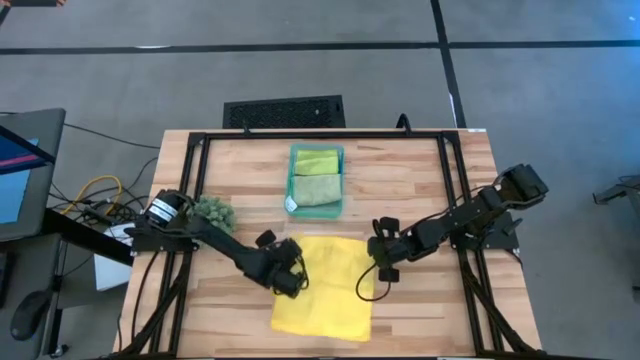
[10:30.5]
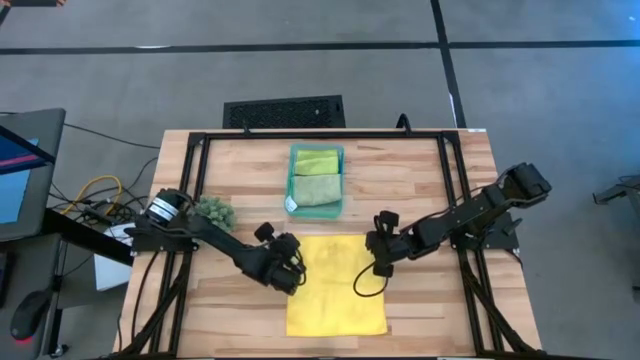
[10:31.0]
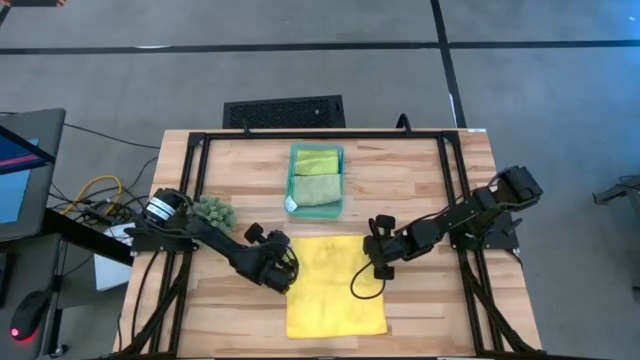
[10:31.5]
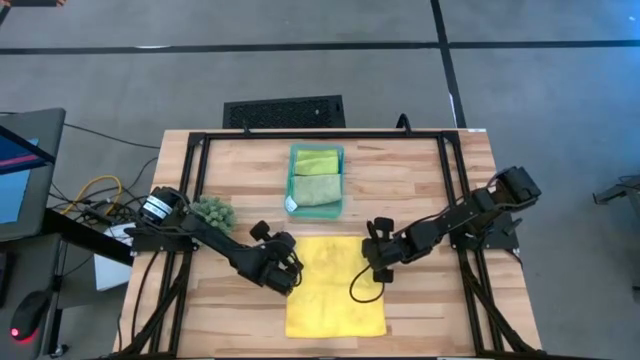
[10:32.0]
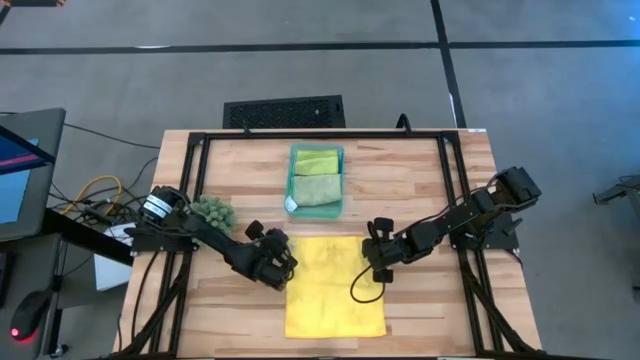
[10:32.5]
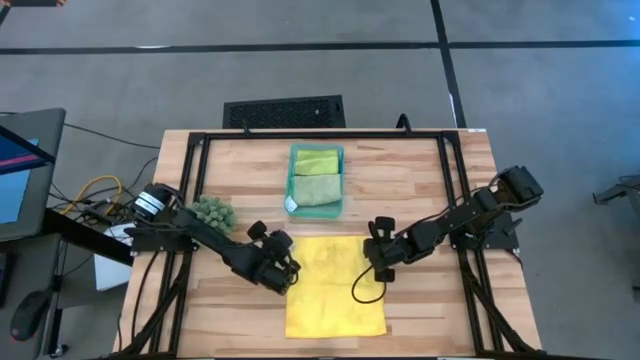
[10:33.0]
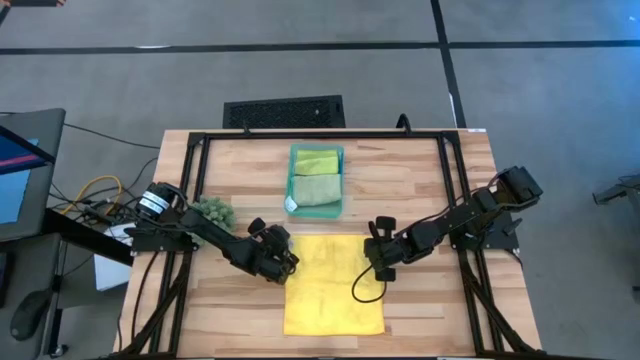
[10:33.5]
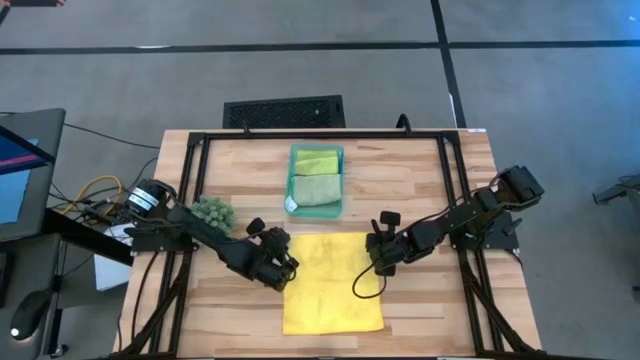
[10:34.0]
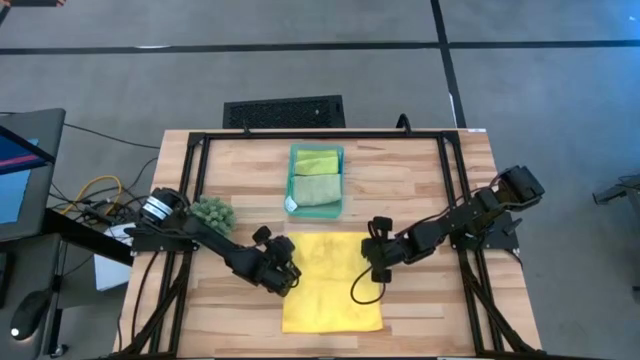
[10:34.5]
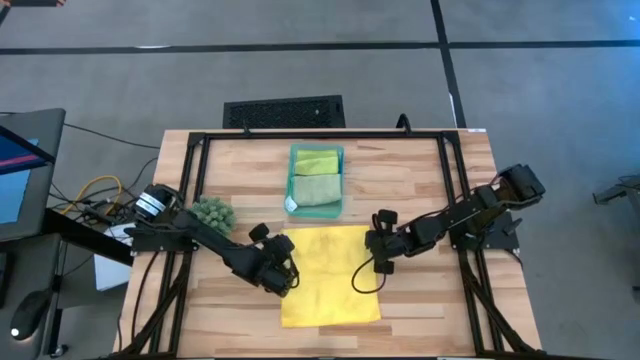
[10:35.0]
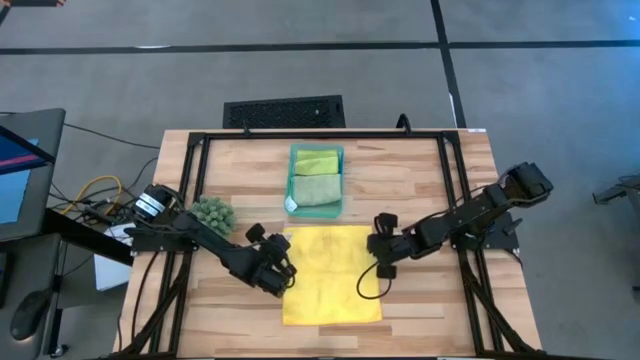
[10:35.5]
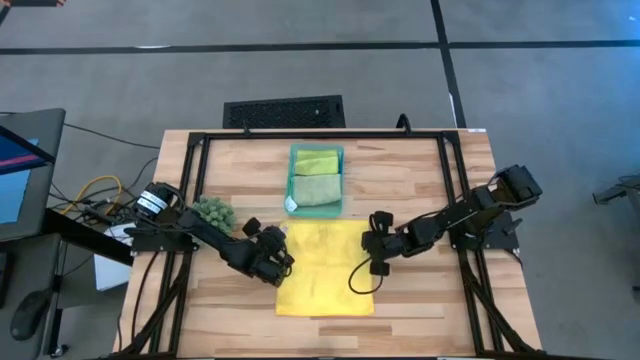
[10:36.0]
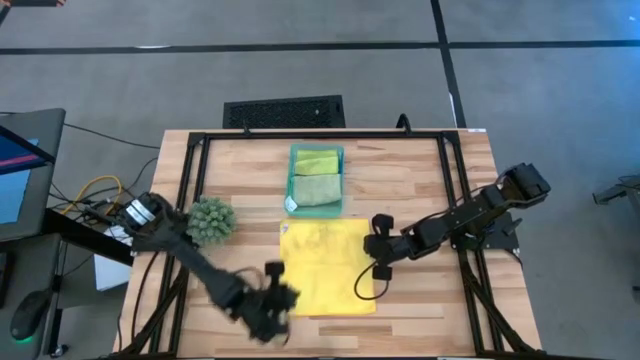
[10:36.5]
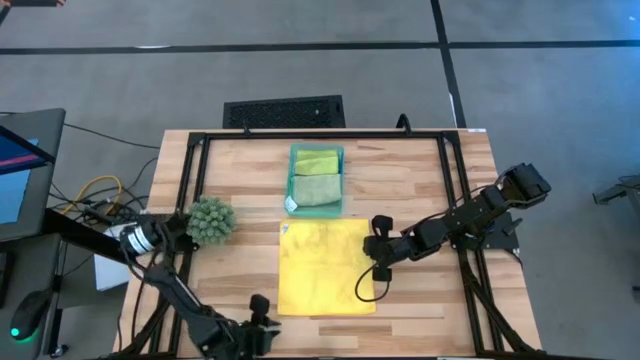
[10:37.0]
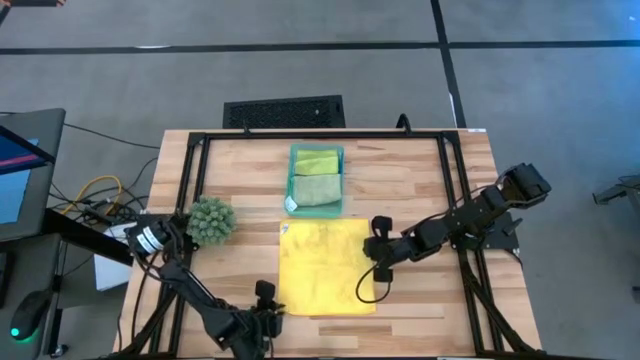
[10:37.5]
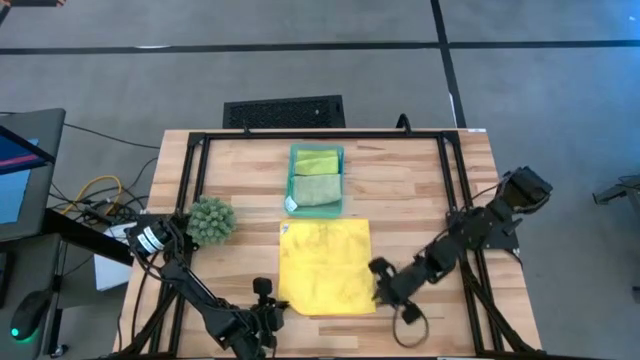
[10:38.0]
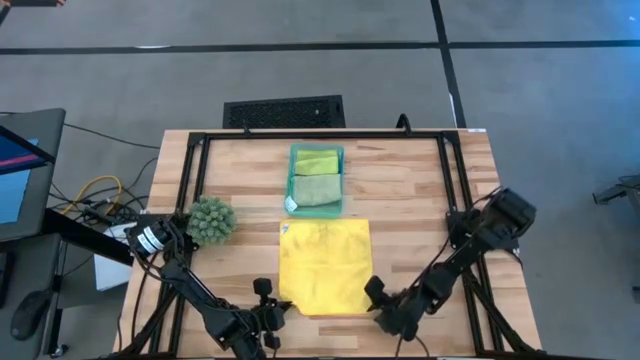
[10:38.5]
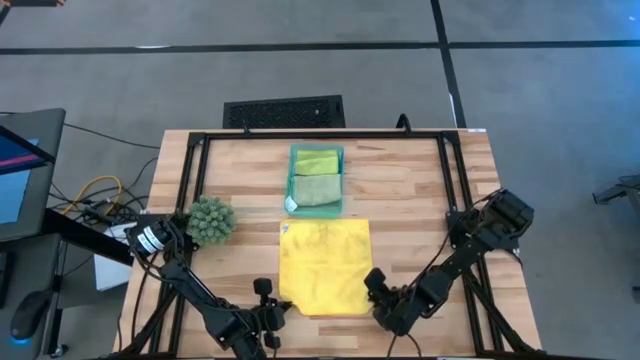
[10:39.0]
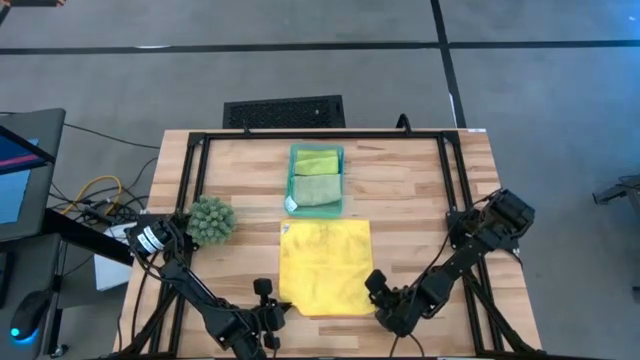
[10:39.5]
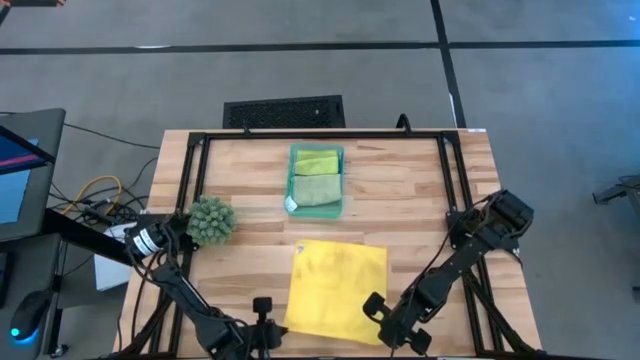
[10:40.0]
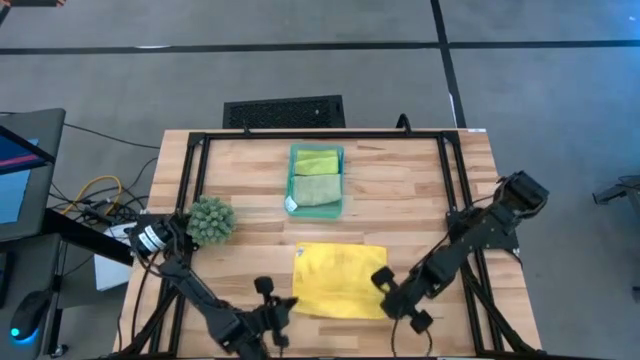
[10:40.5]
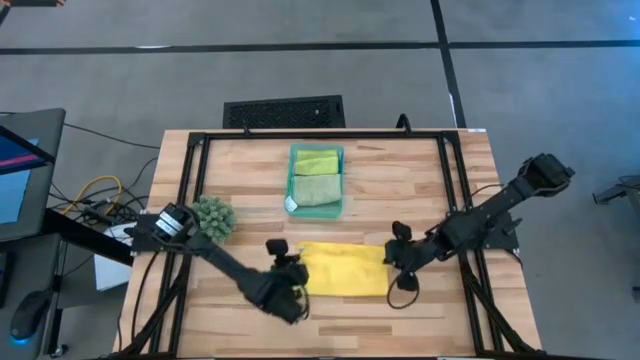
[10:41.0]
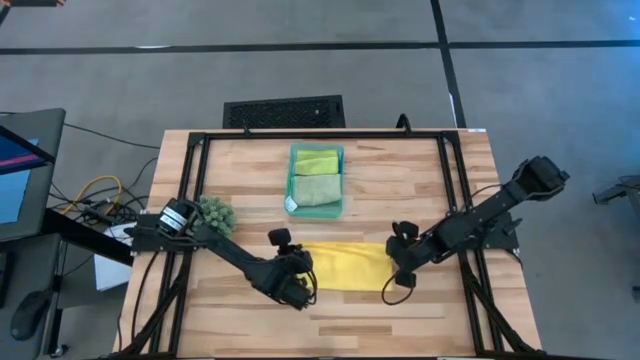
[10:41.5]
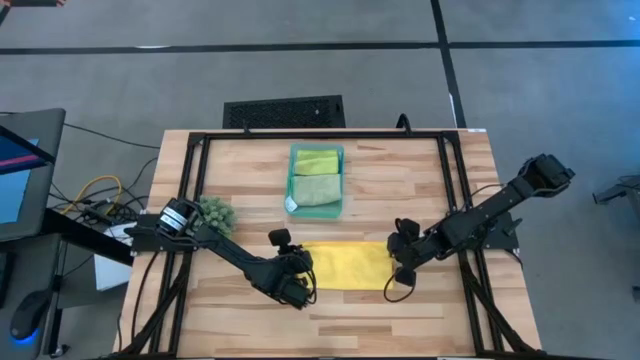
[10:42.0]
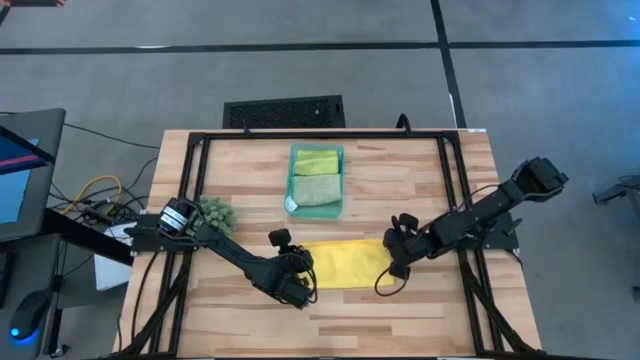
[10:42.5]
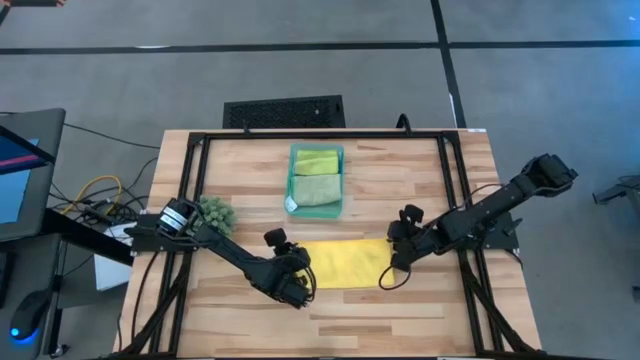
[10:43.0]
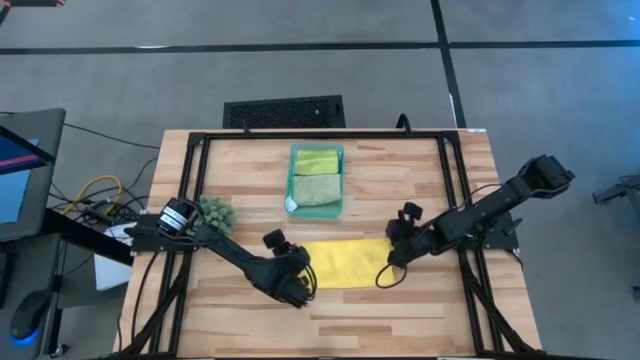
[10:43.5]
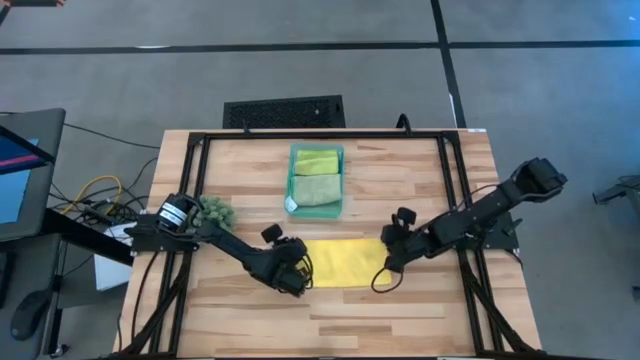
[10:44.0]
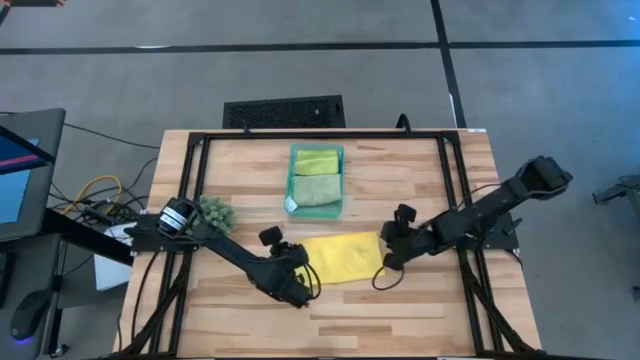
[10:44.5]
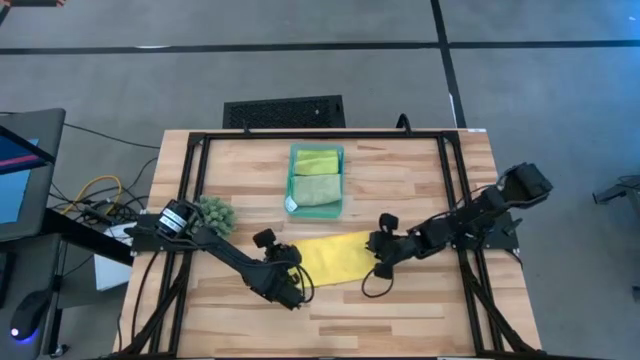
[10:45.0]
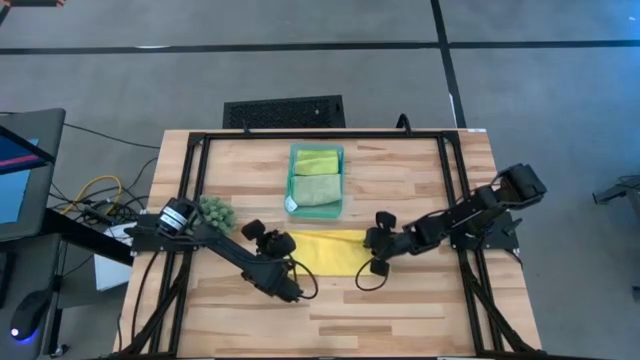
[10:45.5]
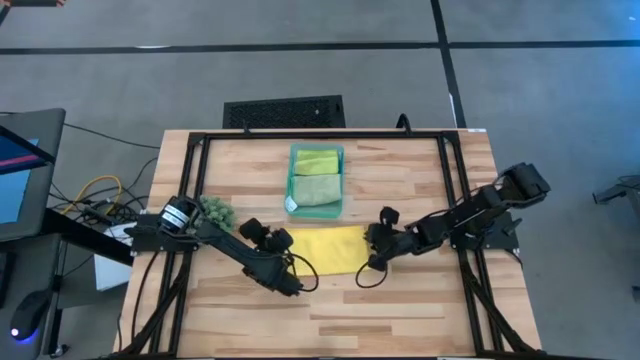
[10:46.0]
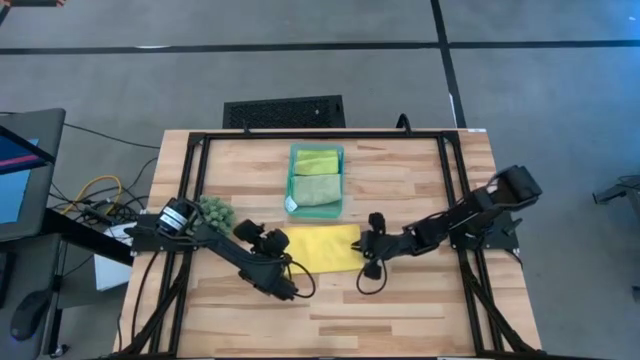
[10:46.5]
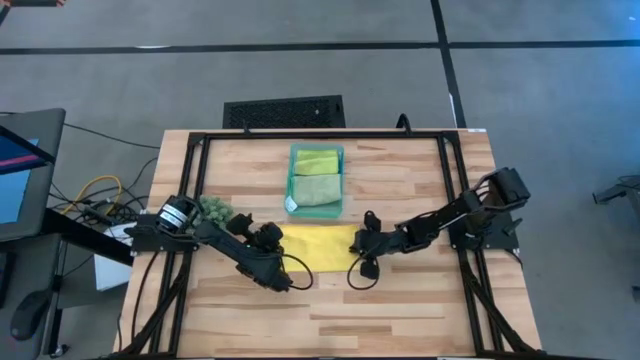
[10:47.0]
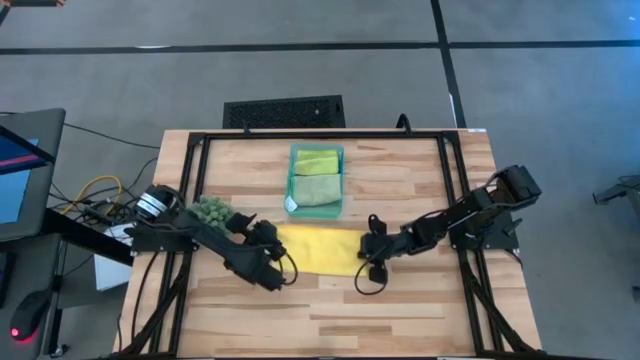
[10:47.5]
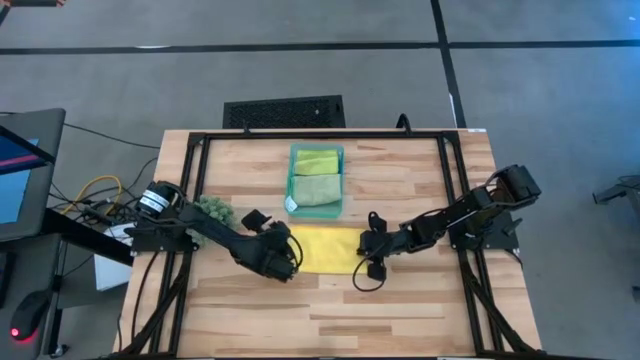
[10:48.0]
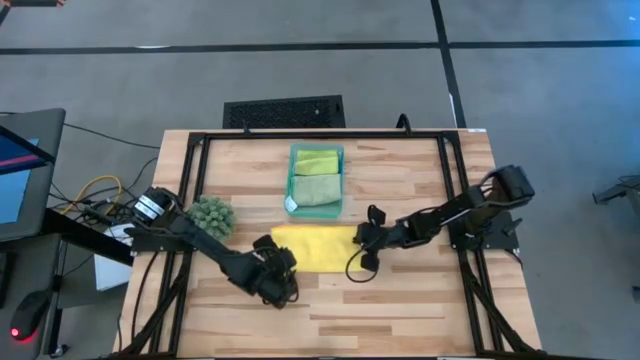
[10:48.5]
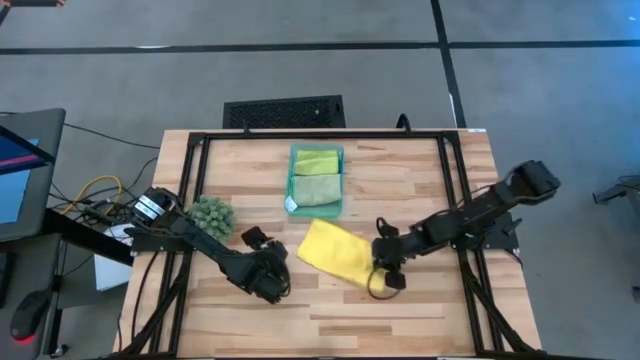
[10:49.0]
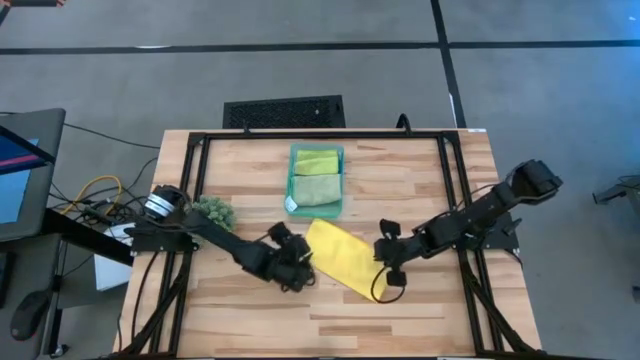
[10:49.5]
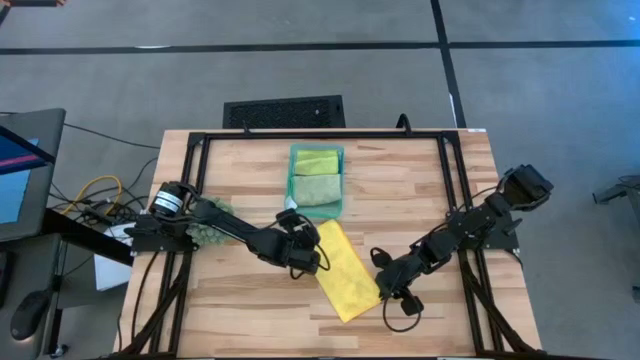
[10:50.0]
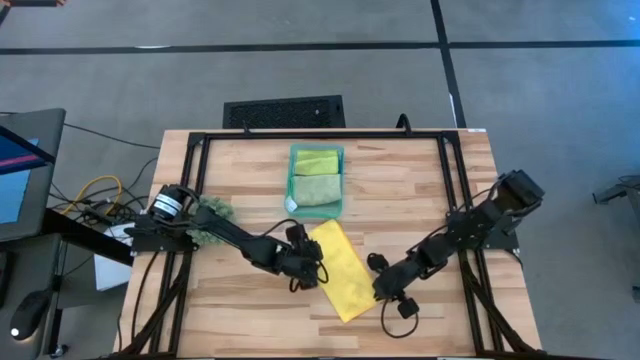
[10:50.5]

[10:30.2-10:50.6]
Task: Fold microfiber towels
Fold the yellow microfiber cloth
